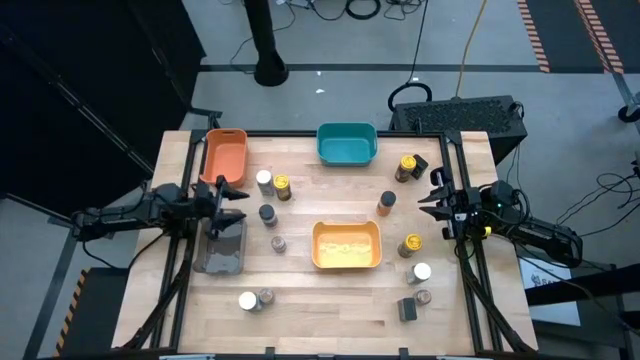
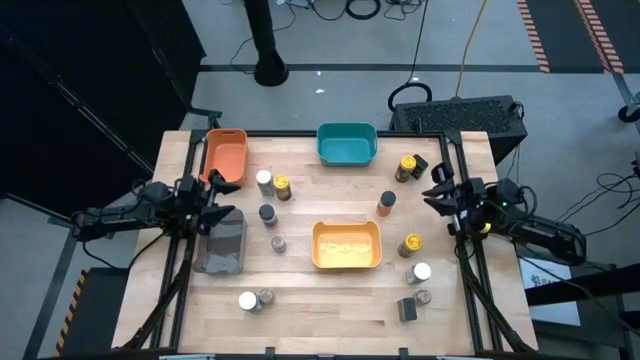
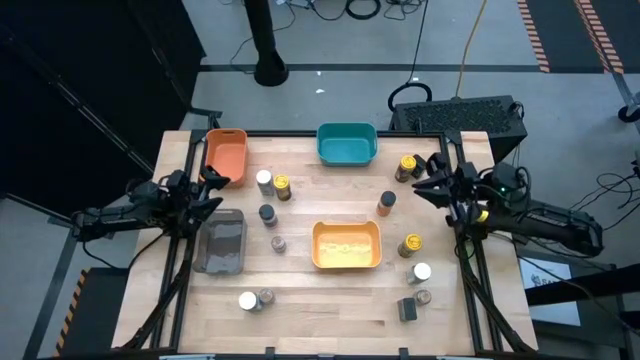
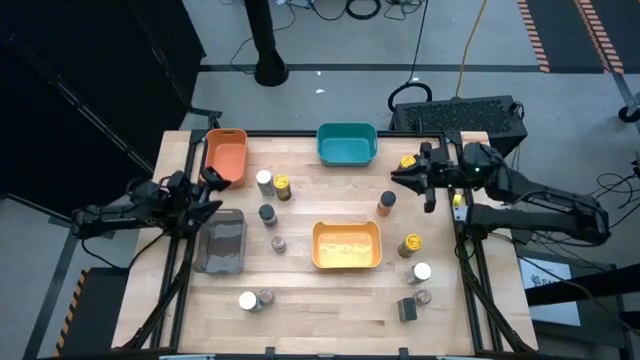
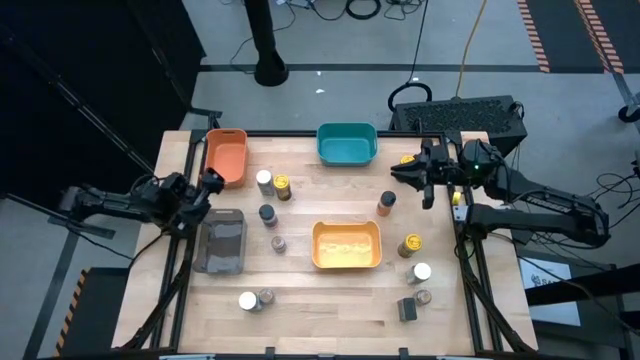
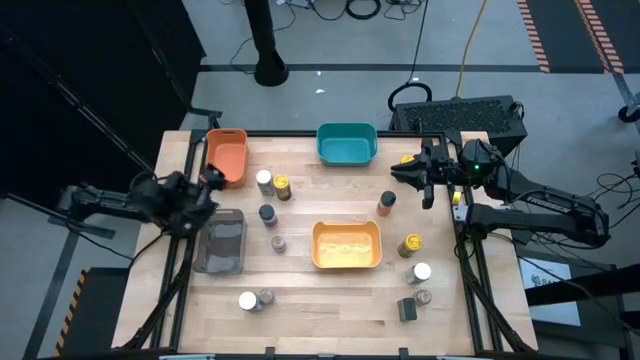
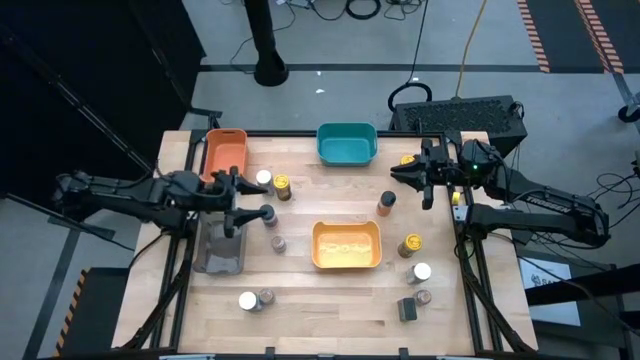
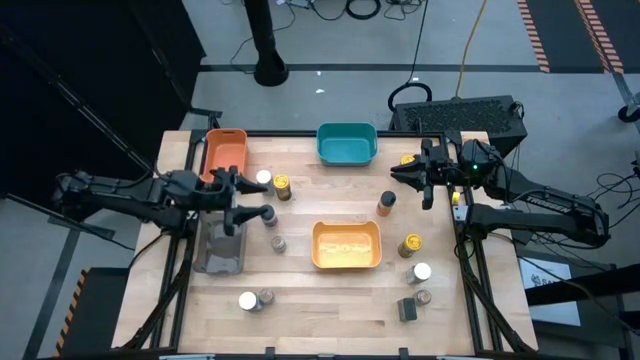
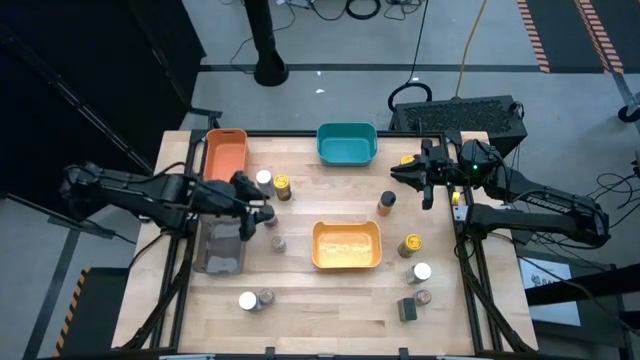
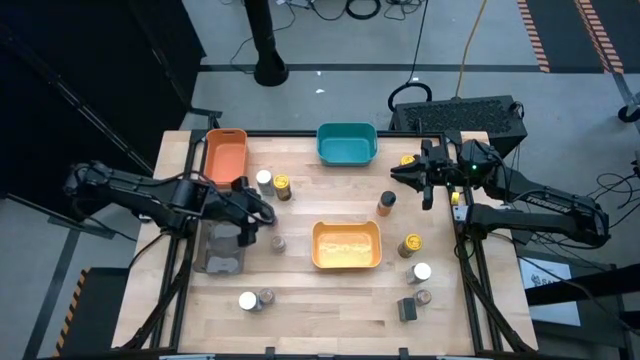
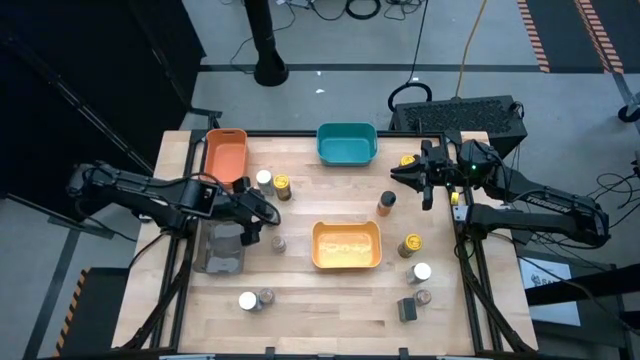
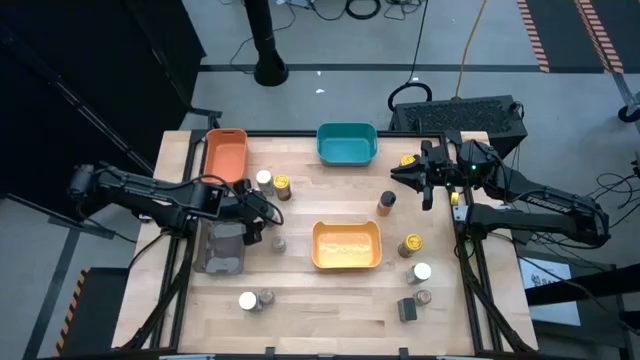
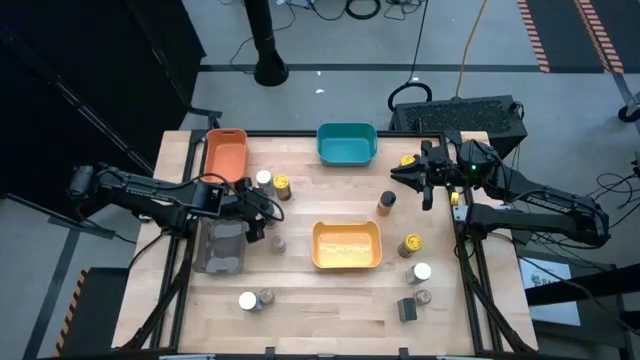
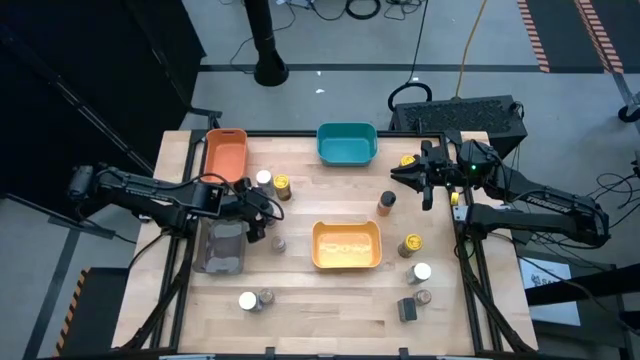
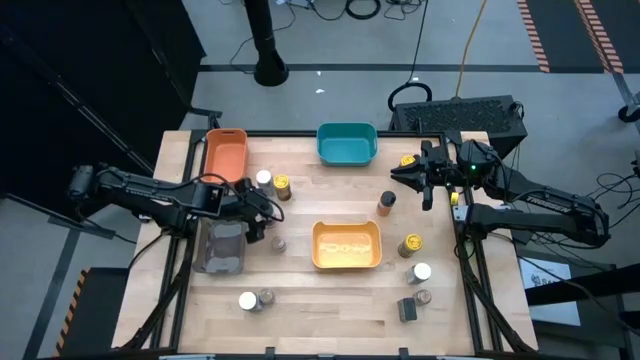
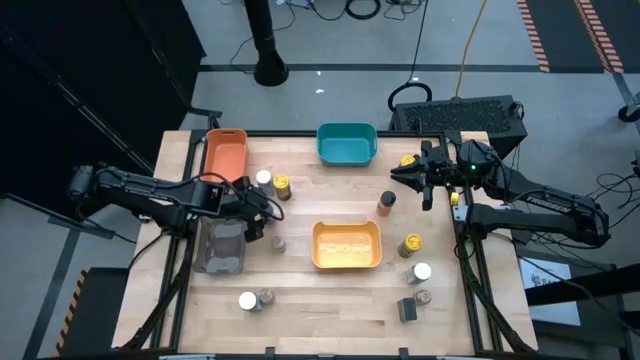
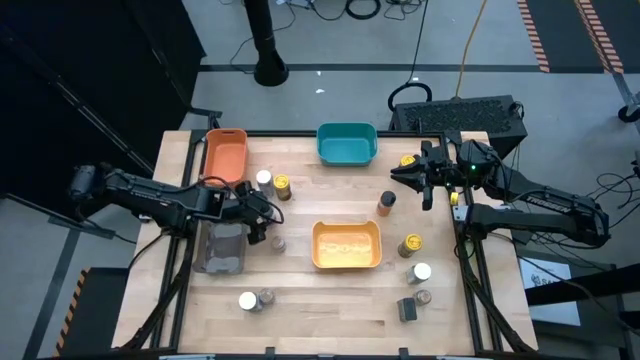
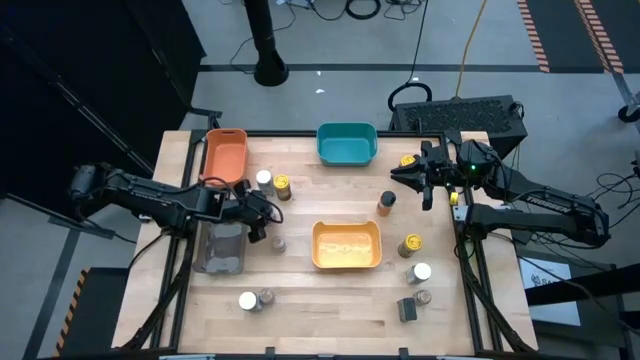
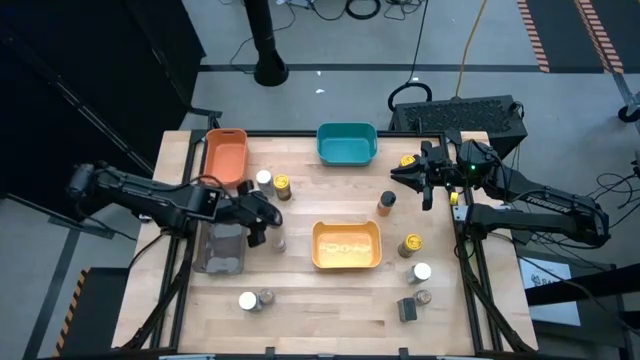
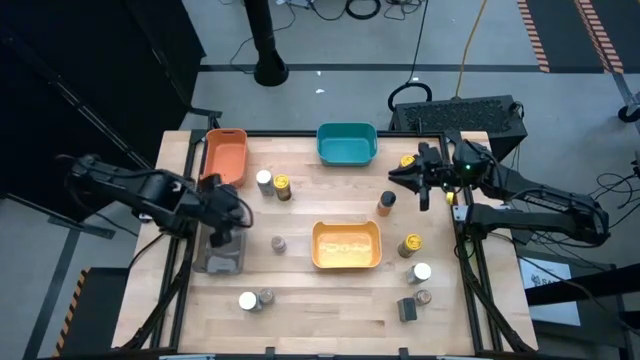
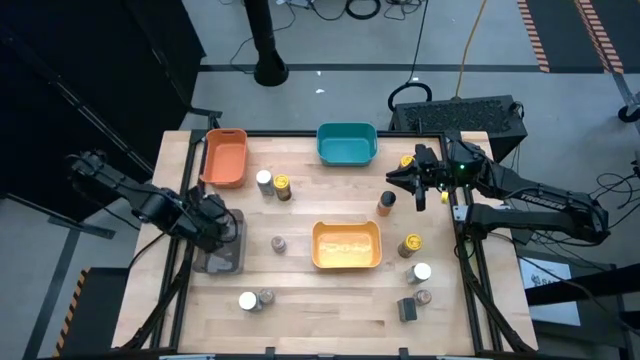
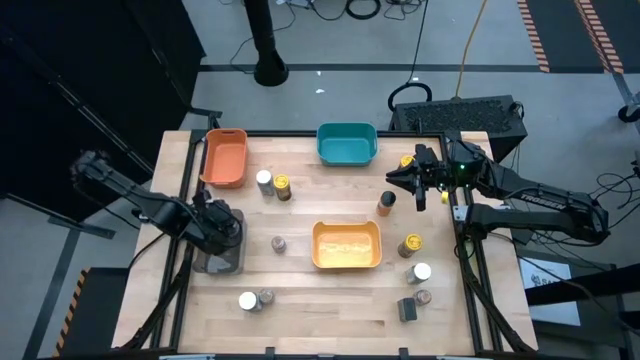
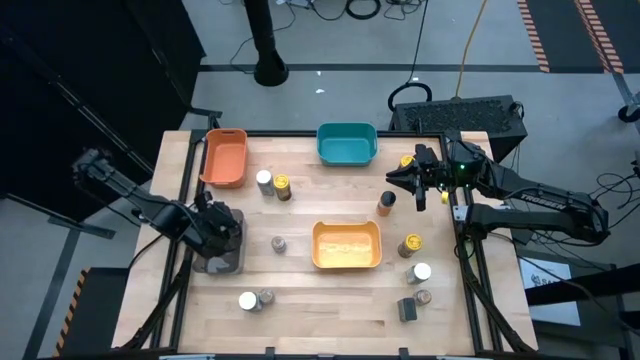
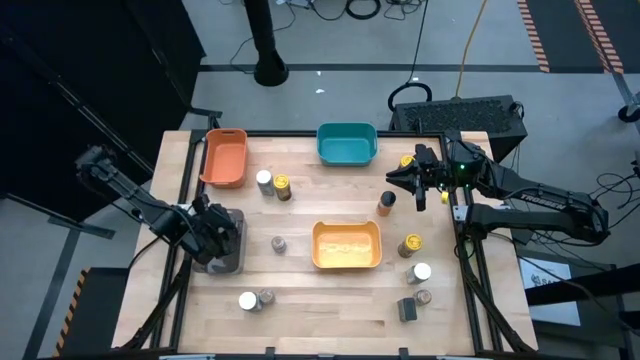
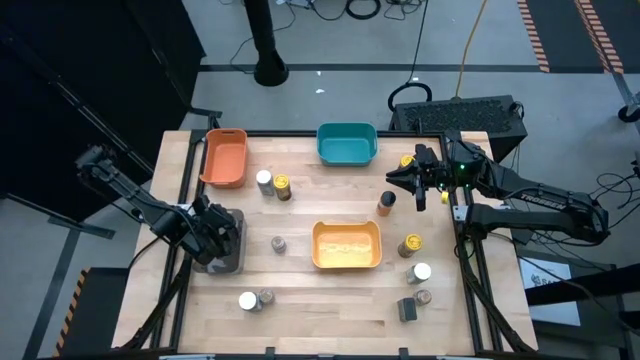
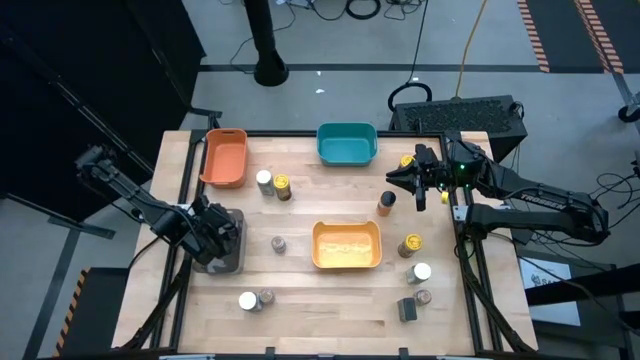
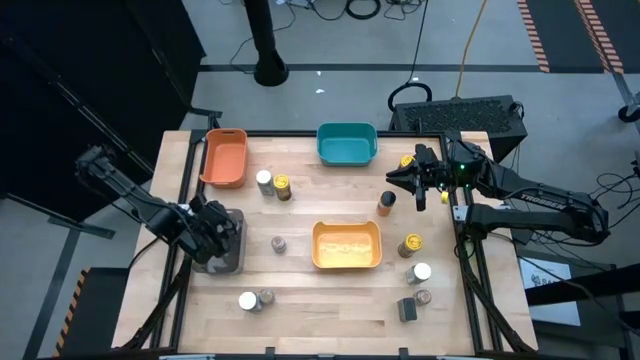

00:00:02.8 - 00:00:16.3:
Task: Sort spices by type
Put the left black spice bottle into the black bin

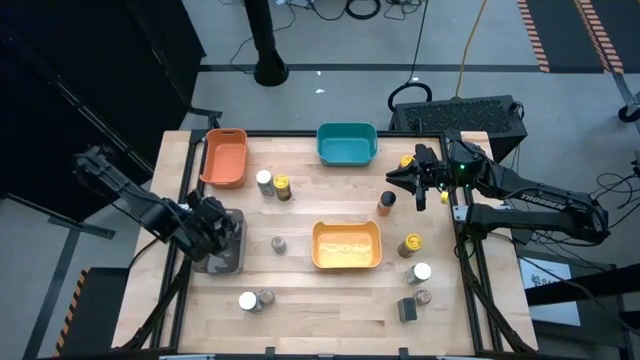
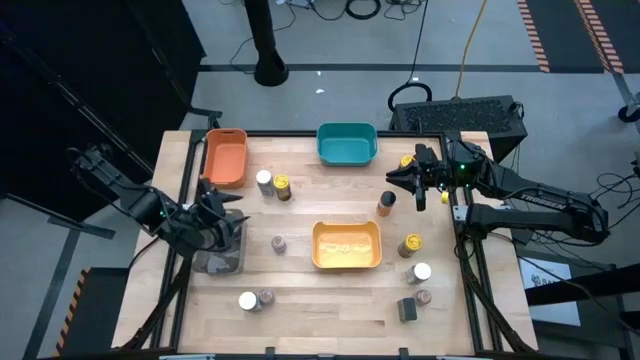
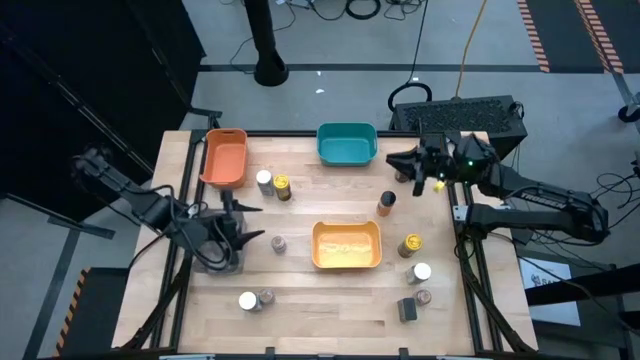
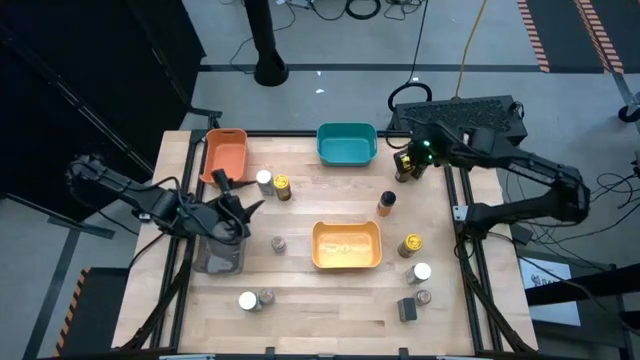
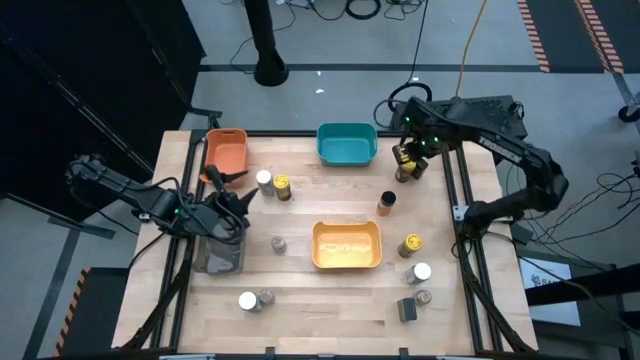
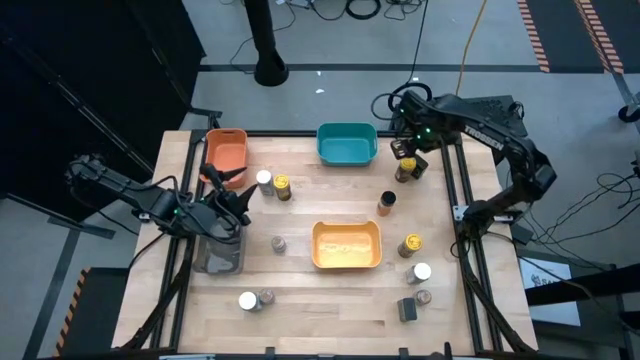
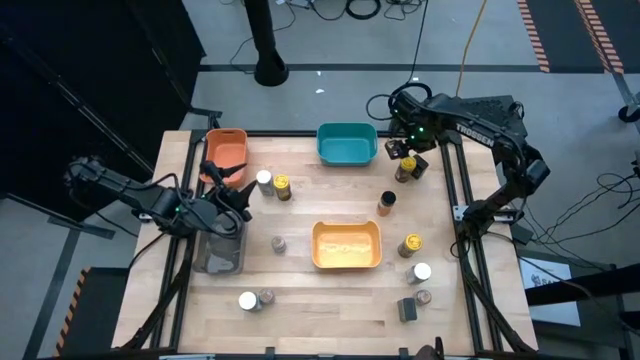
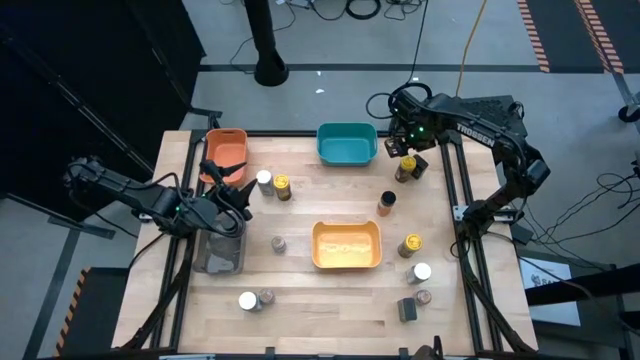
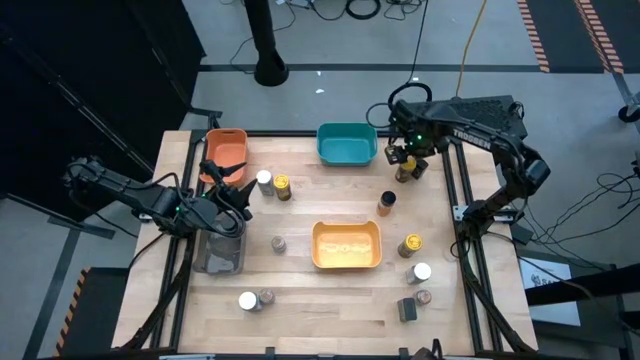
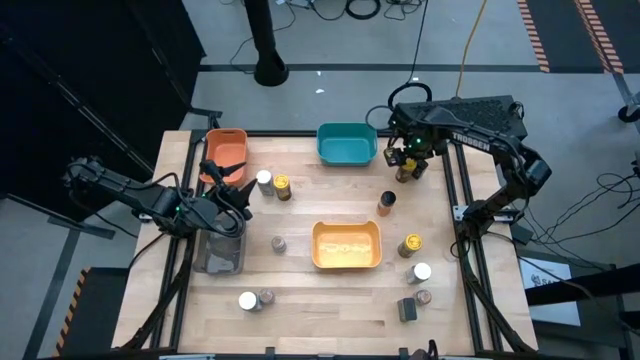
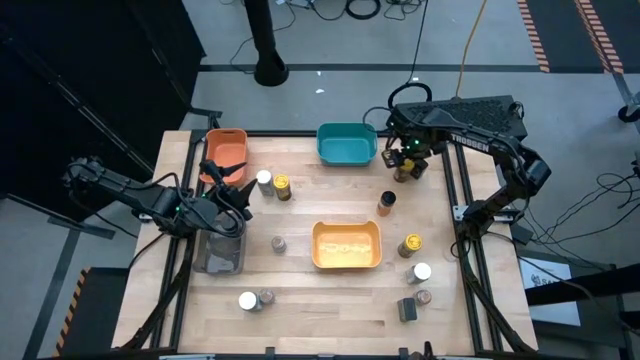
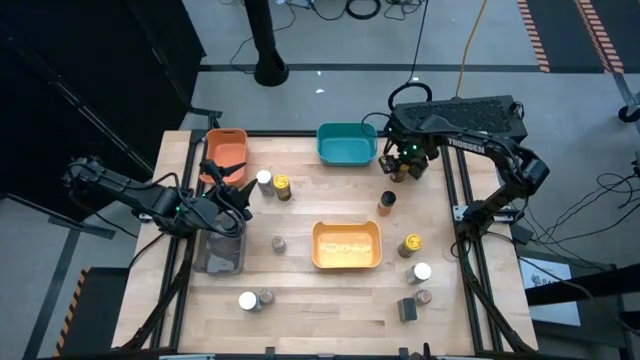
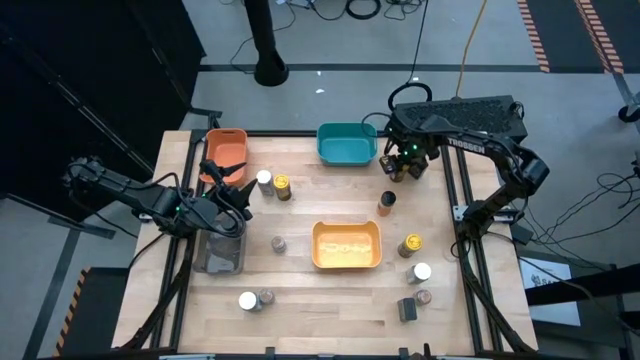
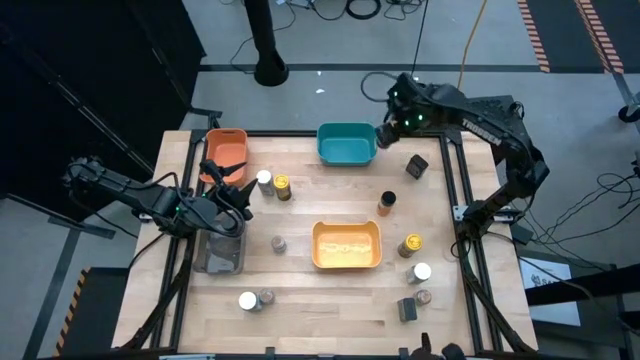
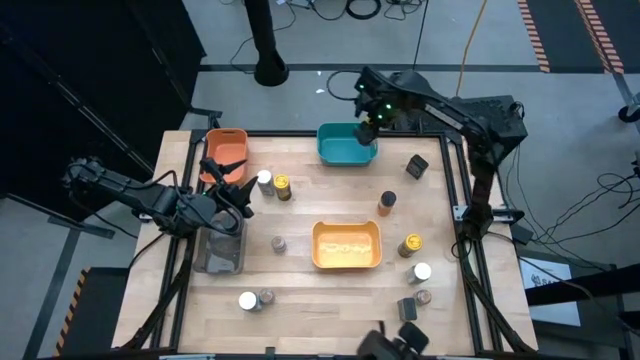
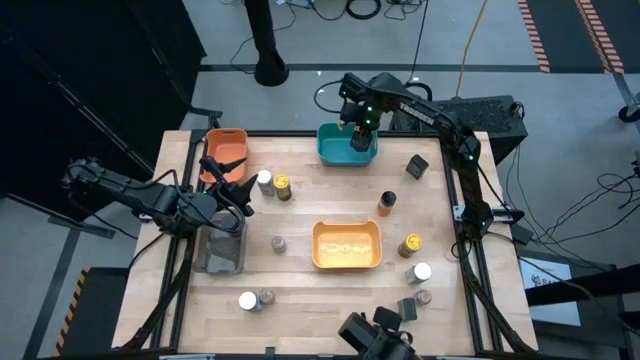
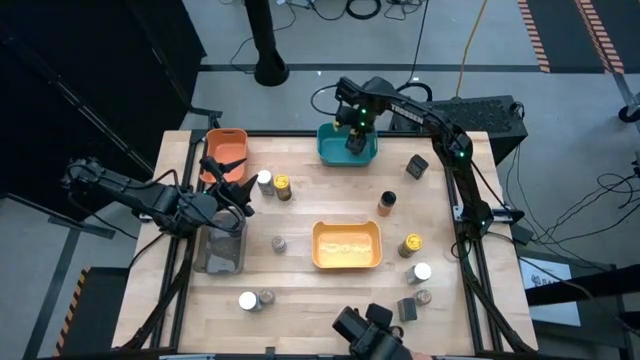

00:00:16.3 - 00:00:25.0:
Put the top right yellow spice bottle into the green bin
